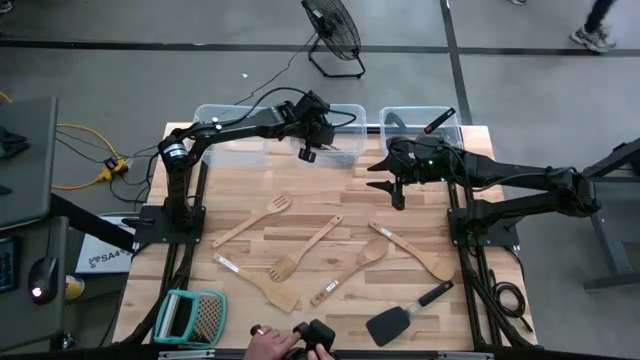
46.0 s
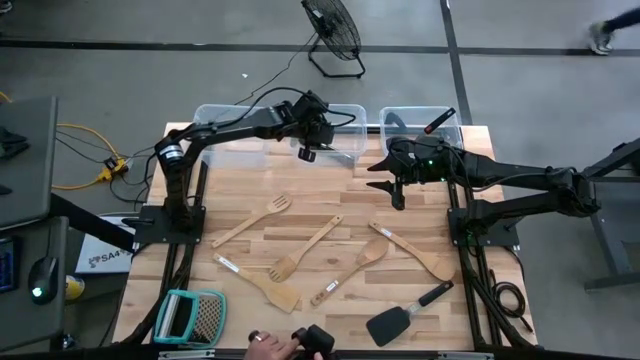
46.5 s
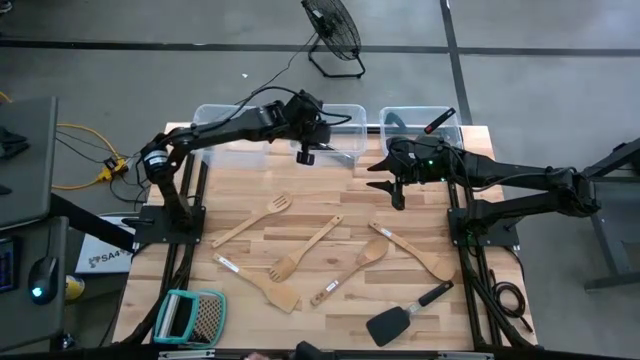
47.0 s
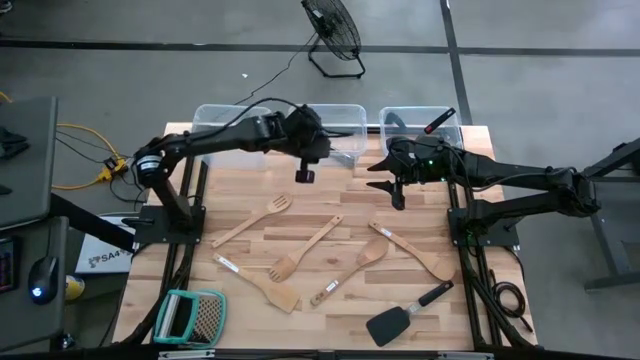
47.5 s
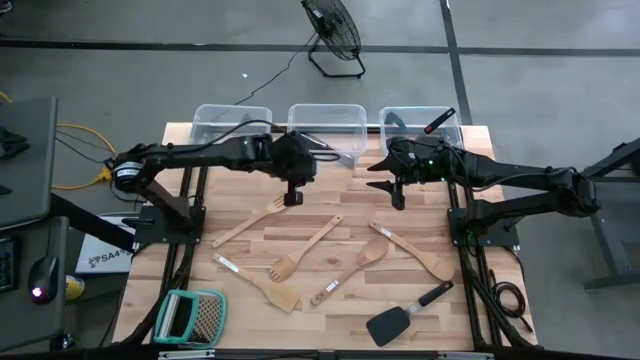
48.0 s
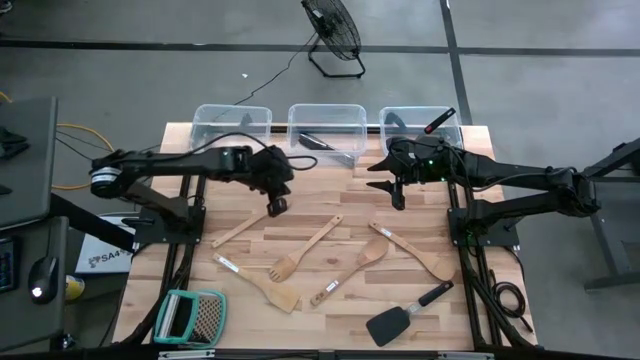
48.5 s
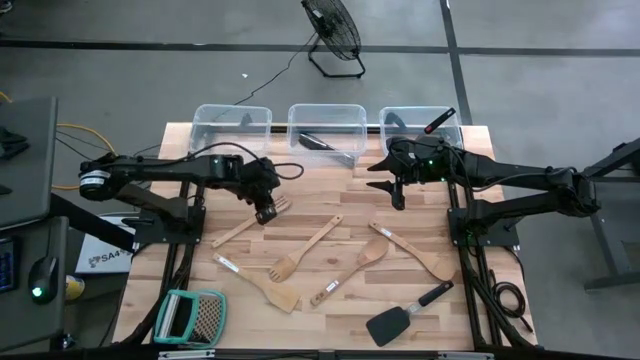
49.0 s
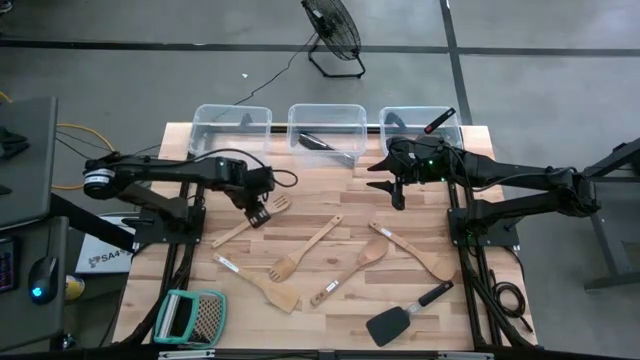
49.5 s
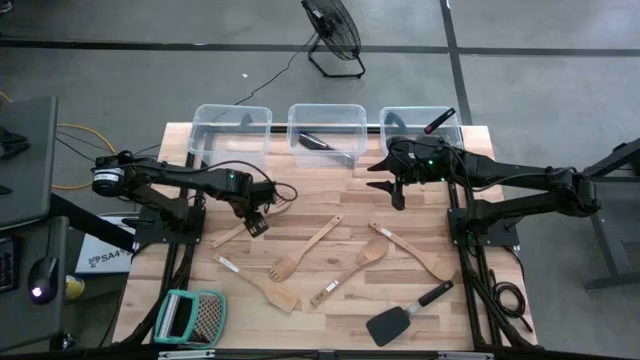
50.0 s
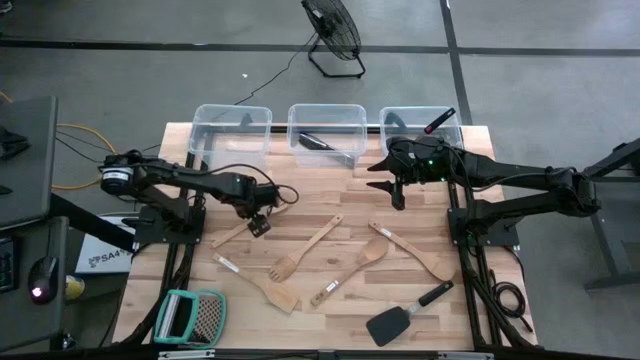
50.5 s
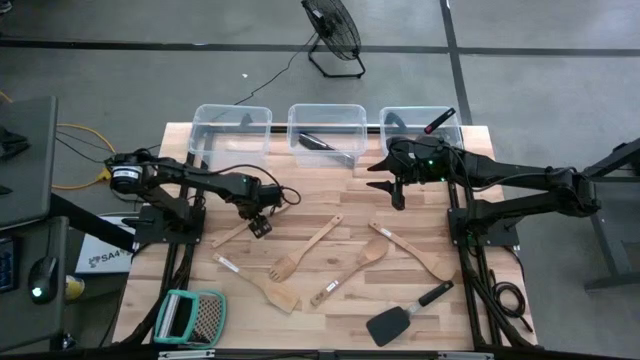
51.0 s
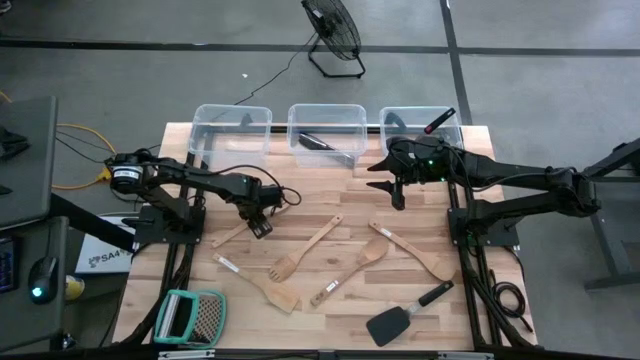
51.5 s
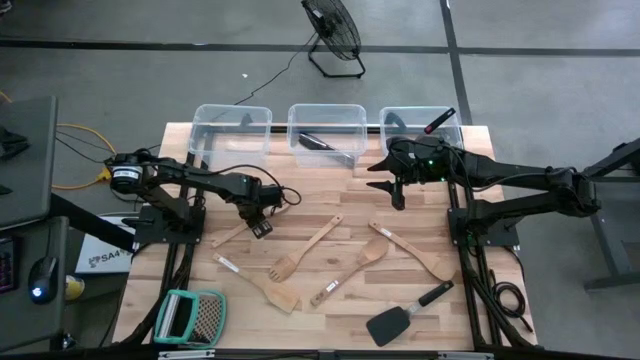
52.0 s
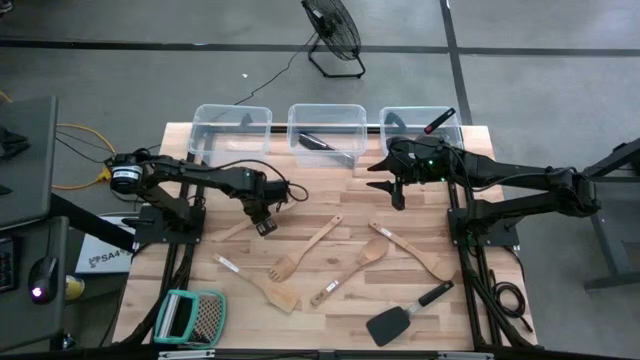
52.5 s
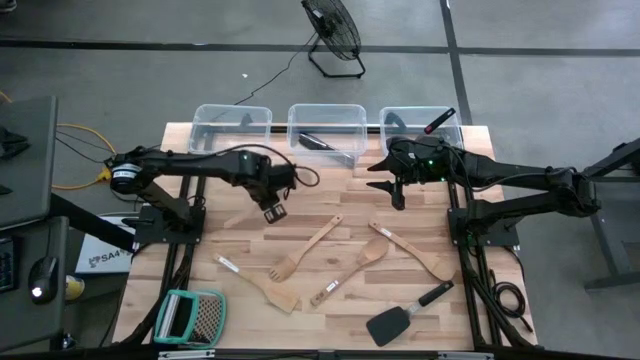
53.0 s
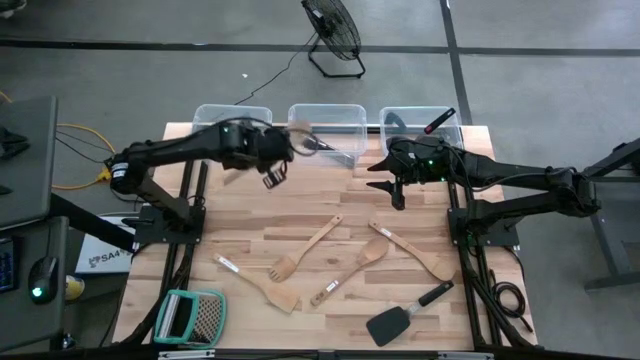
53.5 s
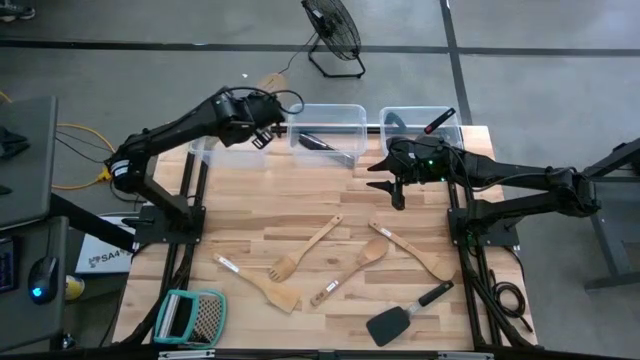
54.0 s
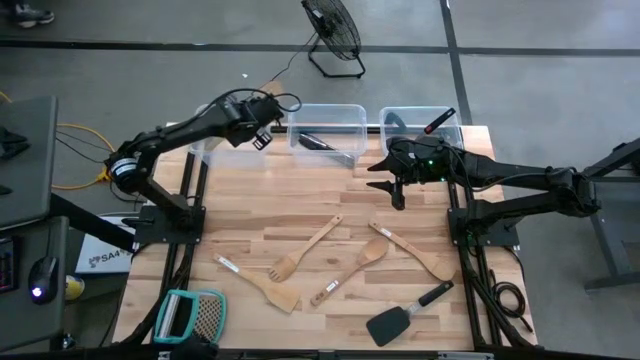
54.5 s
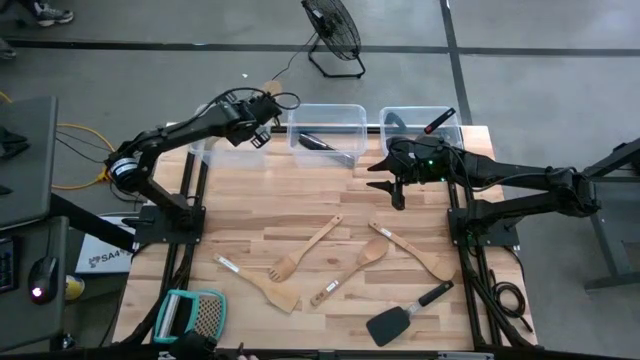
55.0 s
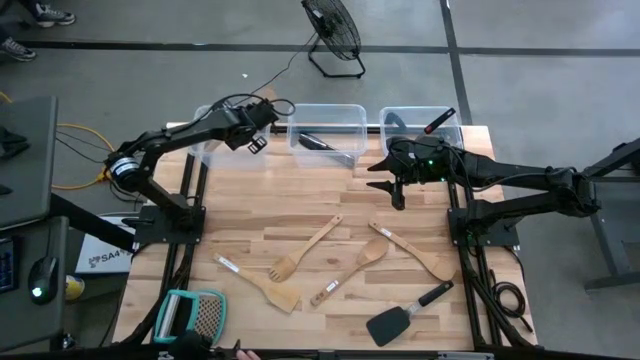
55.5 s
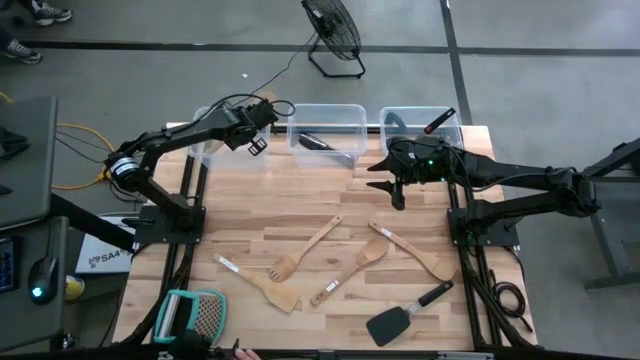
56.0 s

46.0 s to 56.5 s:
Task: Pick & Place Kitchen Items
Put the brown wooden spoon into the left transparent bin

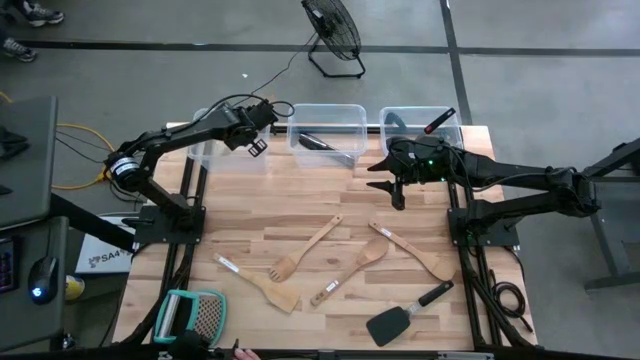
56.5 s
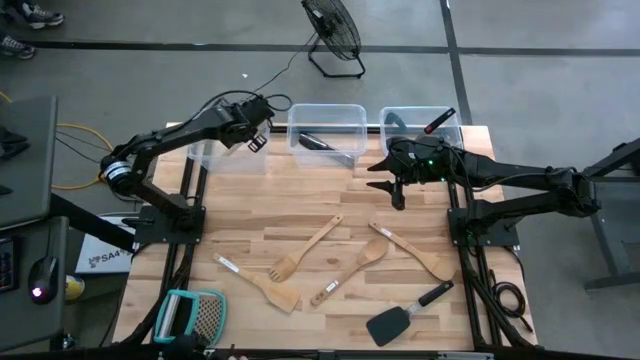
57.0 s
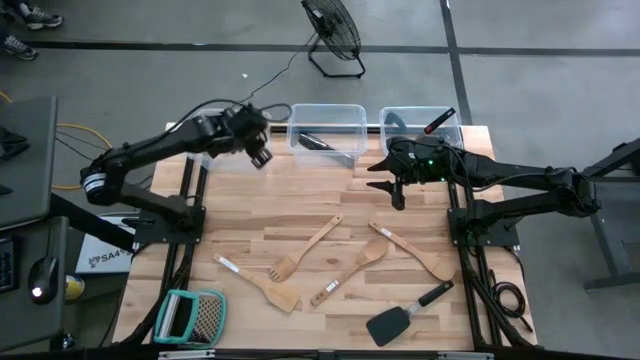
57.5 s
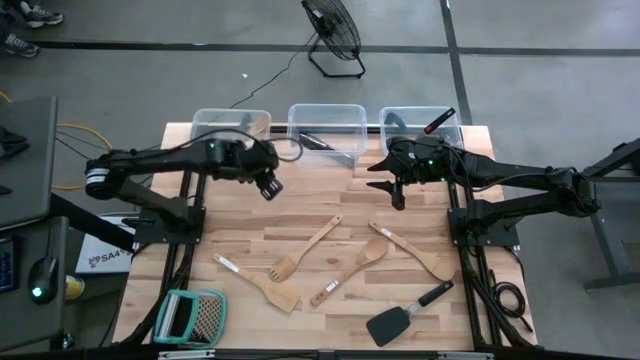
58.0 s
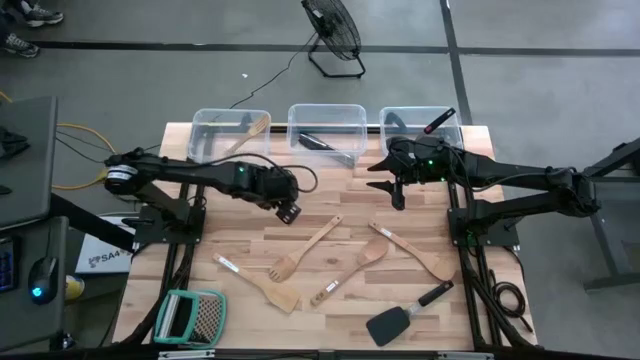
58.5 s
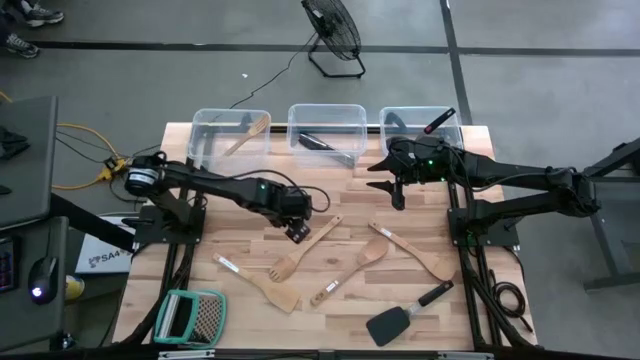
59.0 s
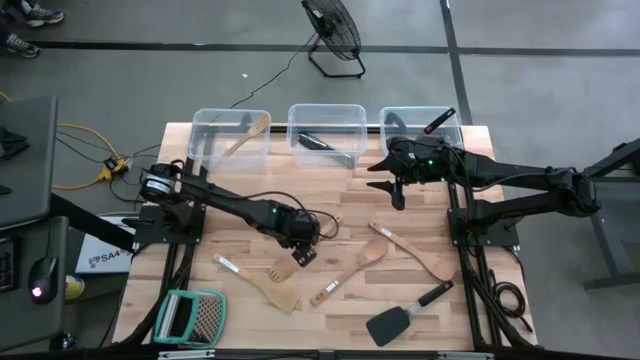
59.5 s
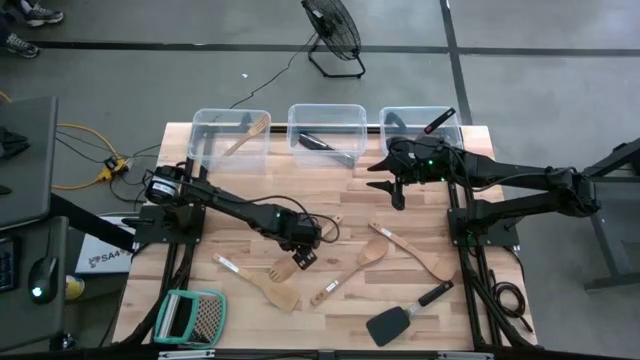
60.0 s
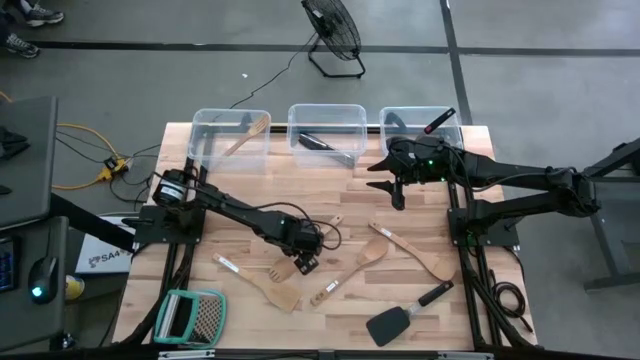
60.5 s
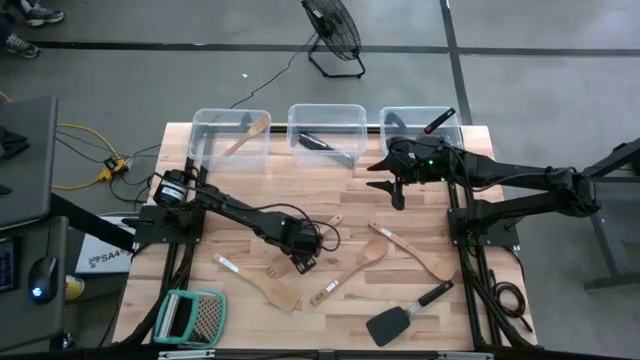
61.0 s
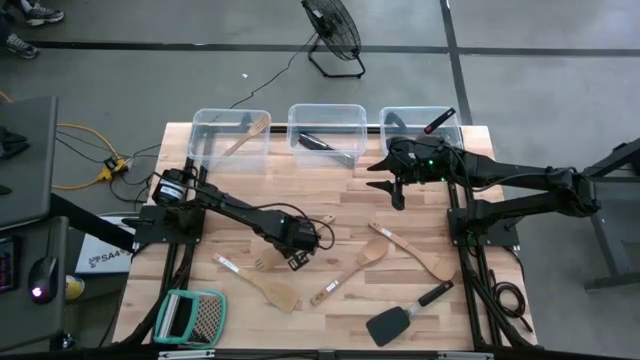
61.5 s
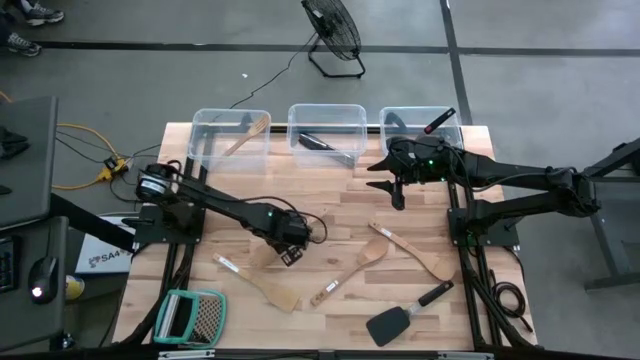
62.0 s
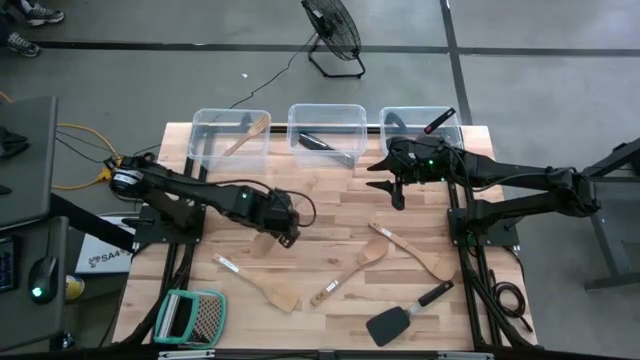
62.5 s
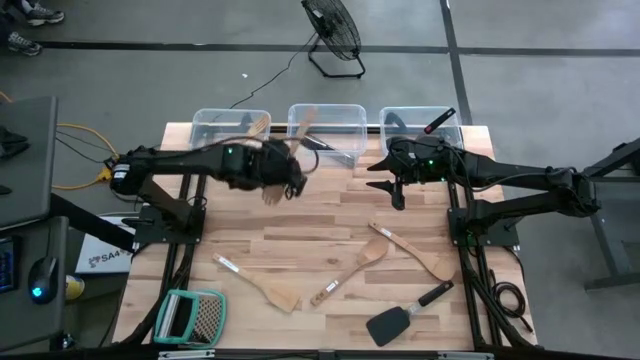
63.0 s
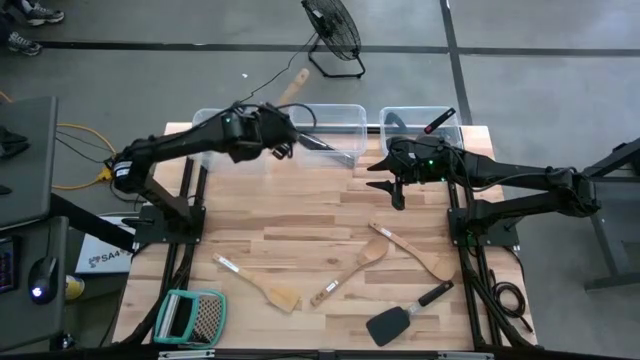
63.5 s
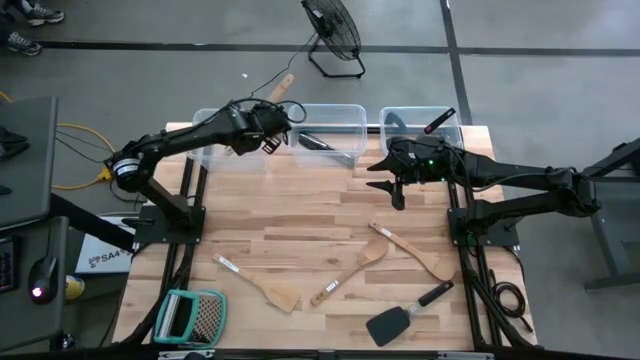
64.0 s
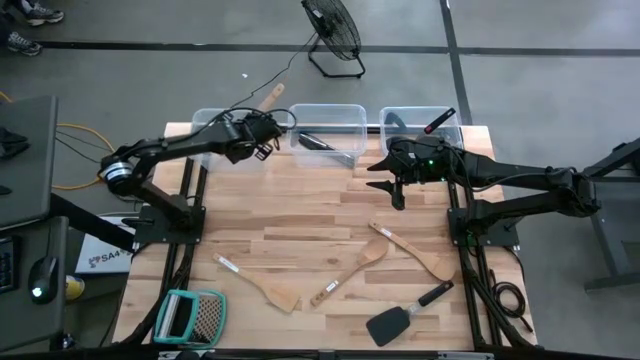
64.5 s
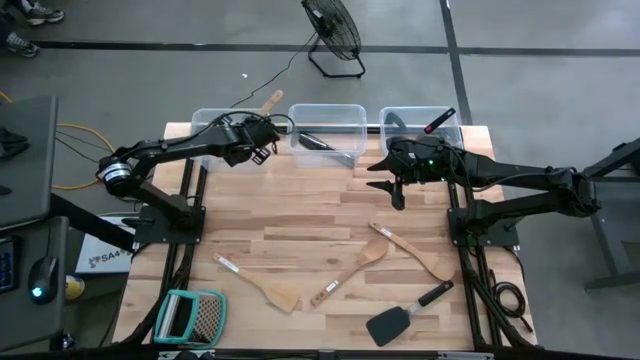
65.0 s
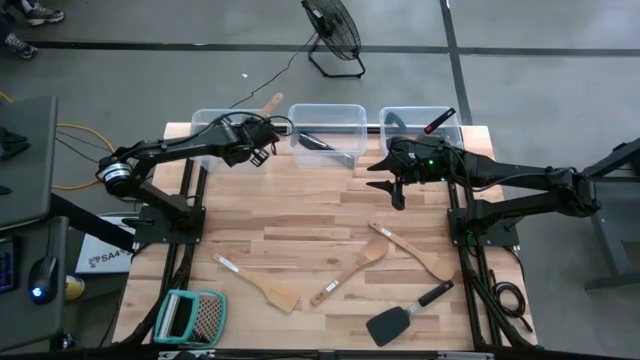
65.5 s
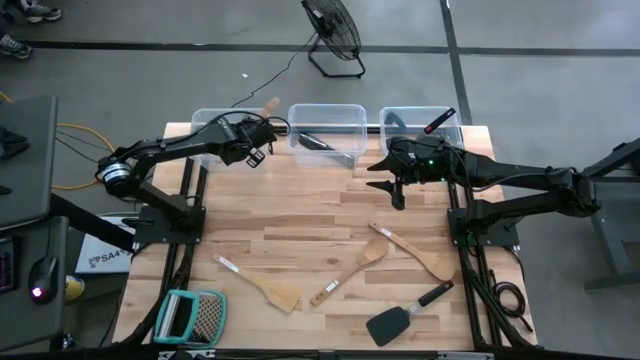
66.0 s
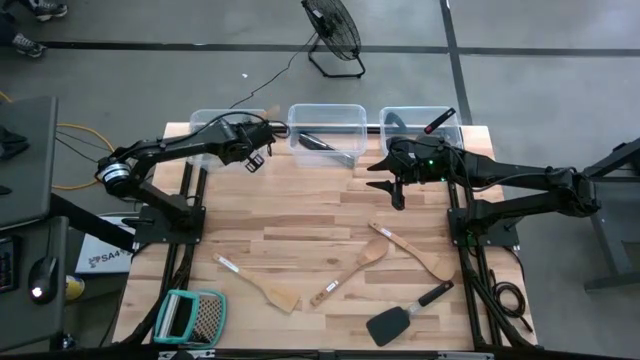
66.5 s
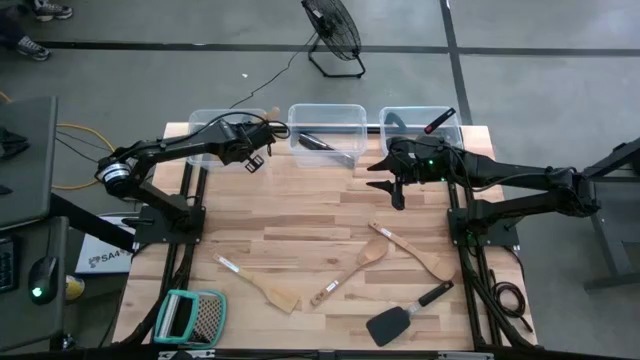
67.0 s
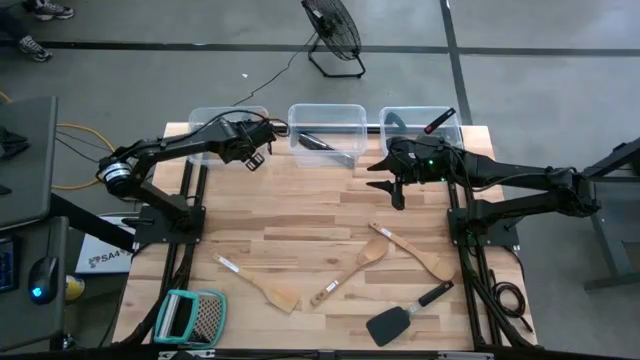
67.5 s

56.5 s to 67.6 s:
Put the brown wooden spoon into the left transparent bin
